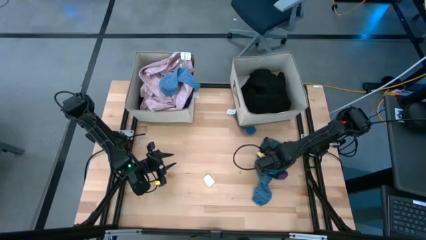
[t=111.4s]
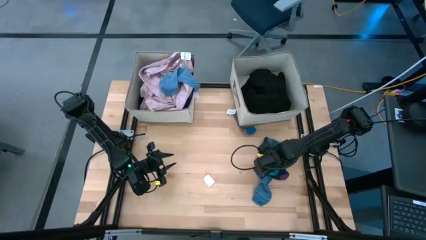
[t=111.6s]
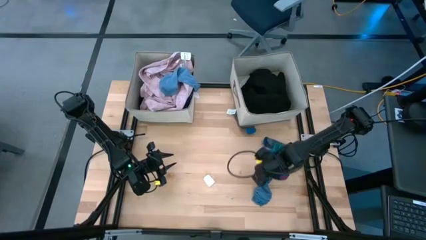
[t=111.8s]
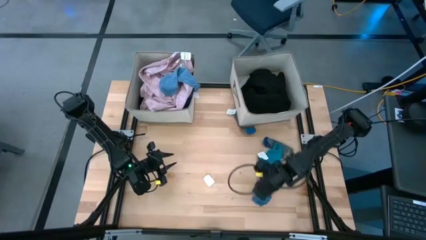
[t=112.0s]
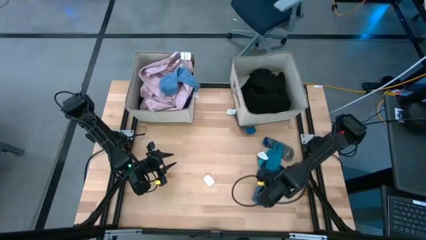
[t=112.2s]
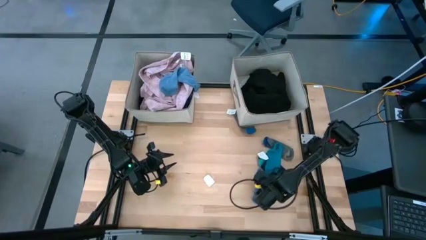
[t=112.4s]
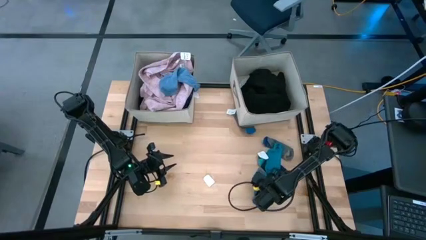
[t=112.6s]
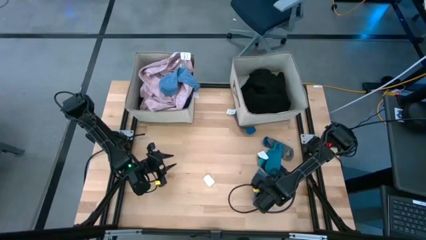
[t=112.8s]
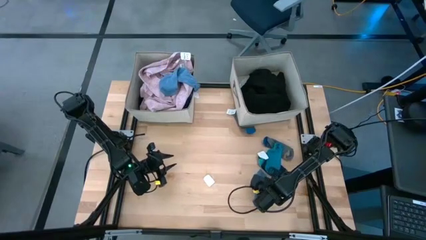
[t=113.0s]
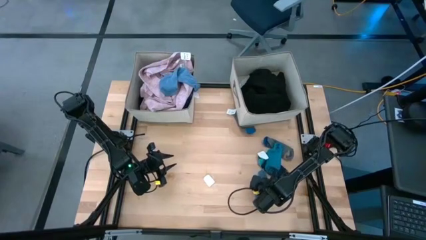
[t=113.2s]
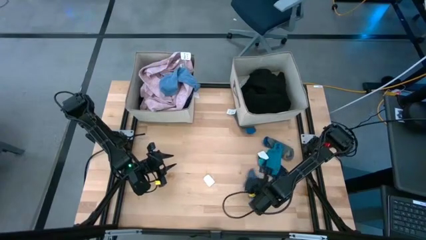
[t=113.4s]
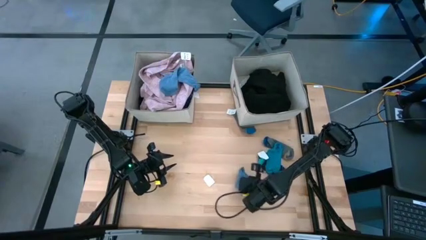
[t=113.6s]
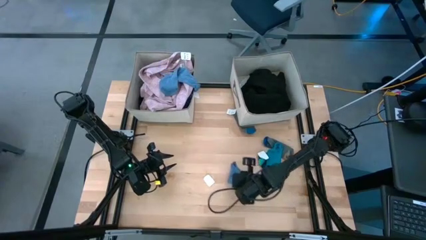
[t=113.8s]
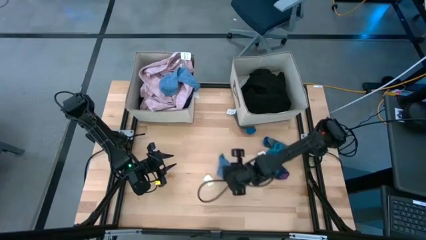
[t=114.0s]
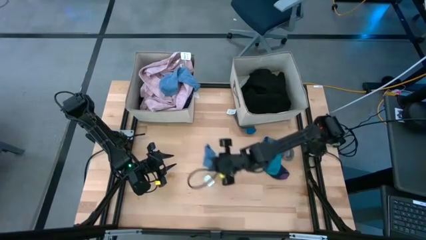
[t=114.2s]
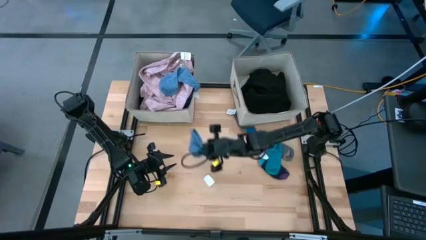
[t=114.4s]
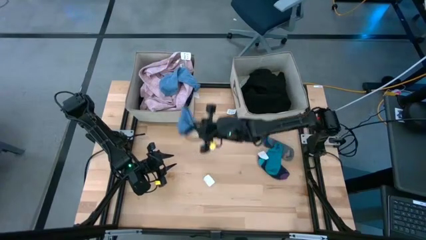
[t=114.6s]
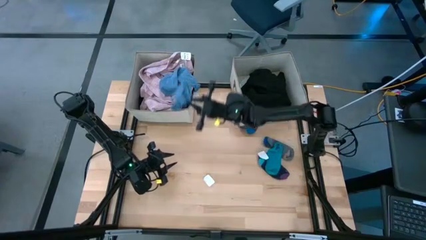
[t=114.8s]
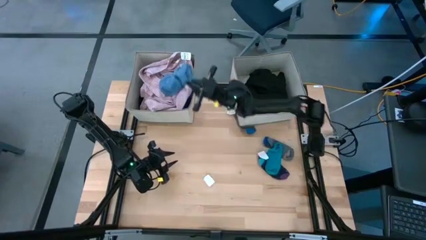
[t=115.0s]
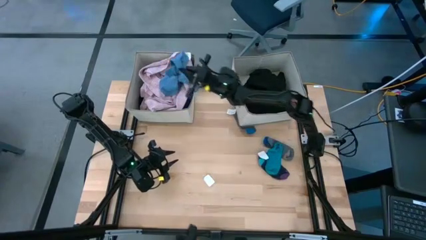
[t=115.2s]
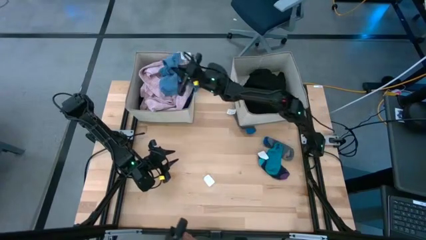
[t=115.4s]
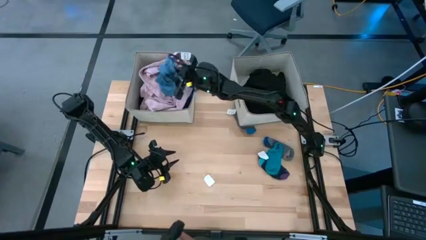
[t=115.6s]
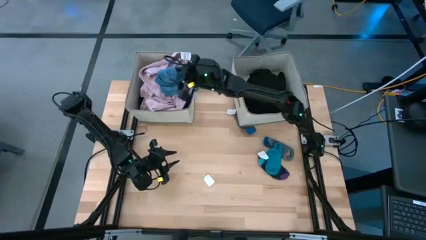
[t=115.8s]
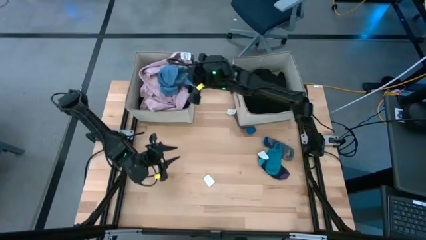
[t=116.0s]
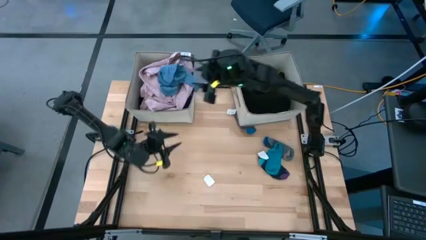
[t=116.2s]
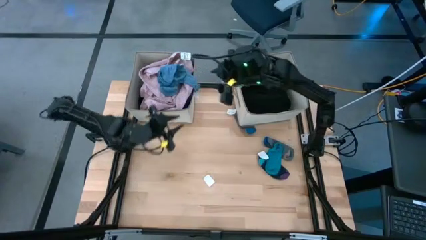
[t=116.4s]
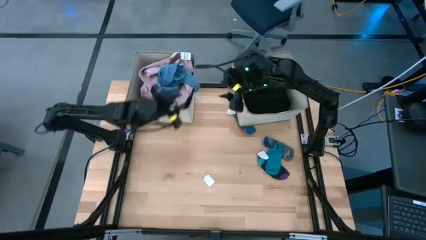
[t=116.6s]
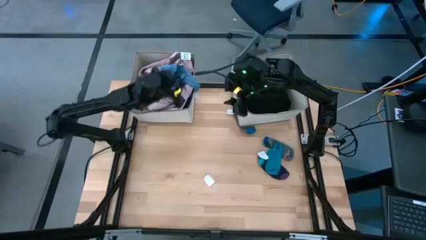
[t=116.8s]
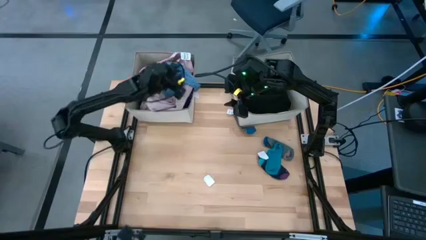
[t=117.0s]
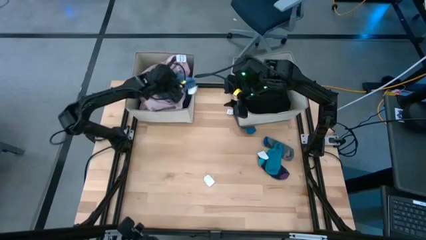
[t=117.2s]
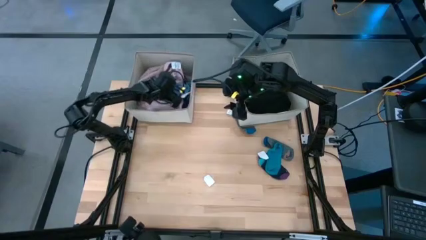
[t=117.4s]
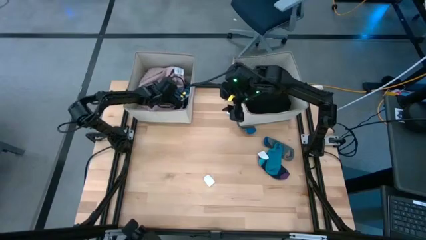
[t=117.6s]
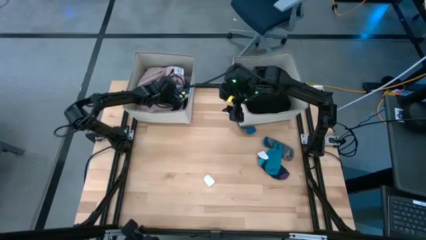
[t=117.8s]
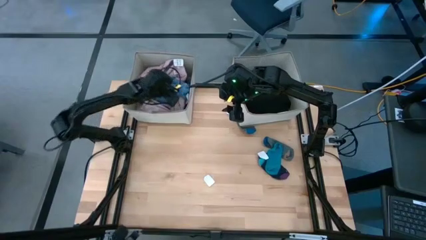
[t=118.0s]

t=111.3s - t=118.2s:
Task: Sort clothes
Put the blue sock into the left brown laundry organizer

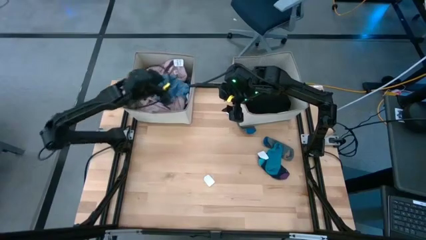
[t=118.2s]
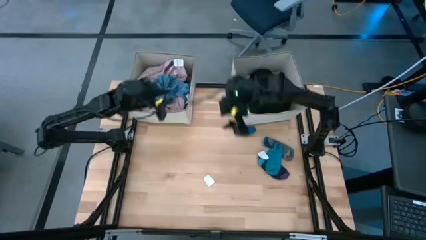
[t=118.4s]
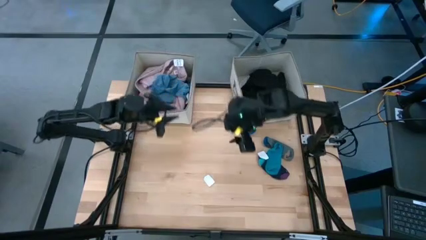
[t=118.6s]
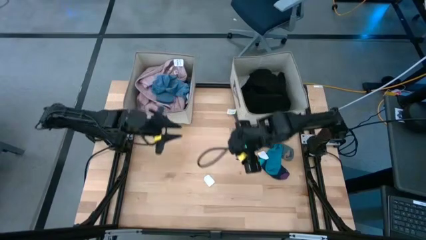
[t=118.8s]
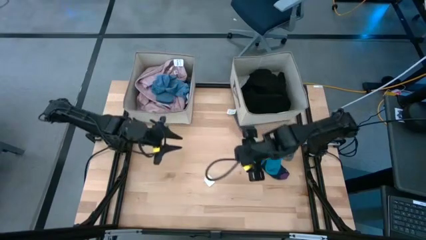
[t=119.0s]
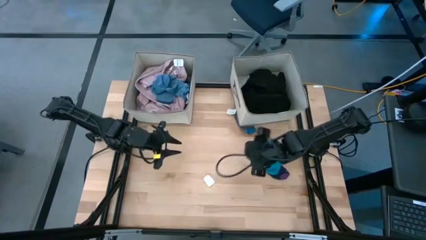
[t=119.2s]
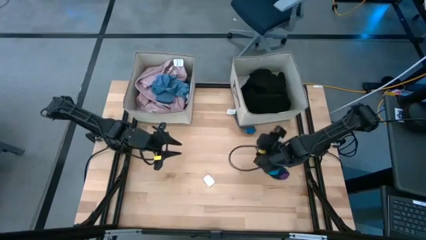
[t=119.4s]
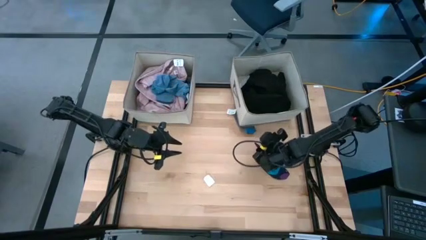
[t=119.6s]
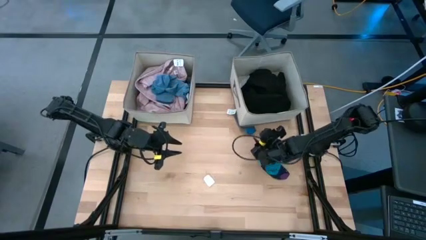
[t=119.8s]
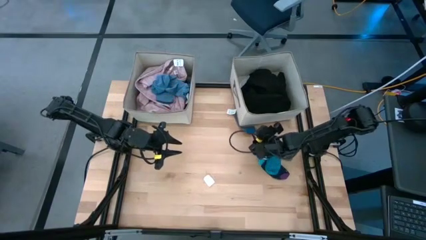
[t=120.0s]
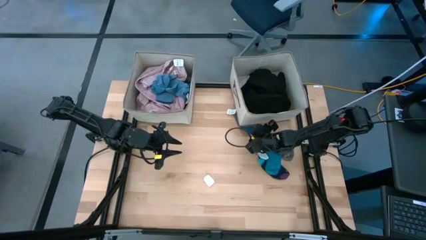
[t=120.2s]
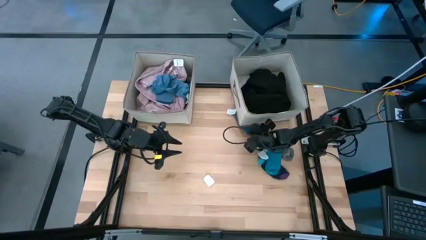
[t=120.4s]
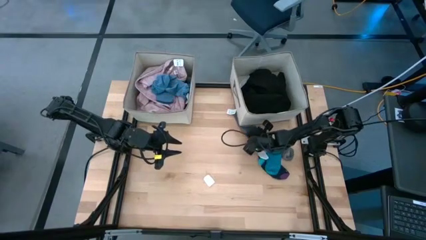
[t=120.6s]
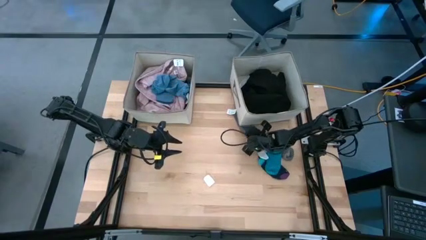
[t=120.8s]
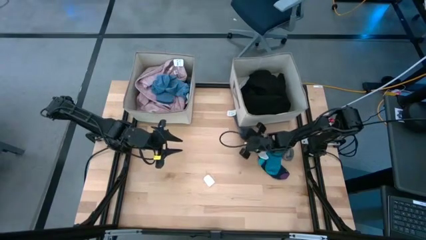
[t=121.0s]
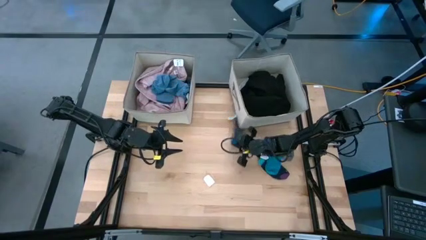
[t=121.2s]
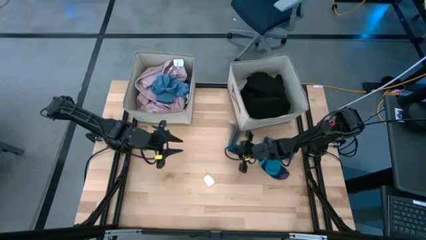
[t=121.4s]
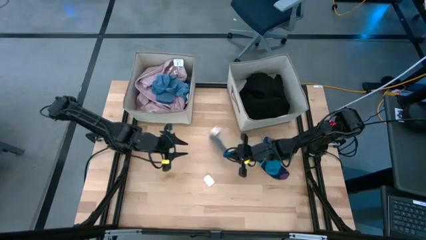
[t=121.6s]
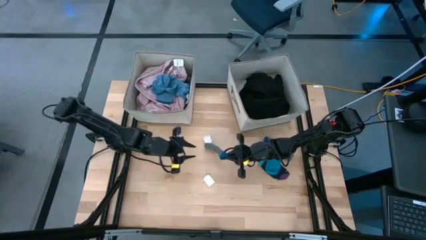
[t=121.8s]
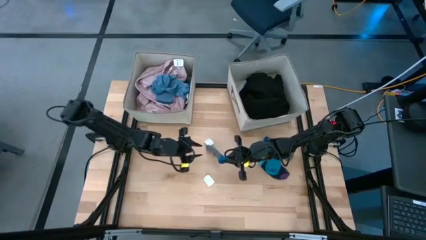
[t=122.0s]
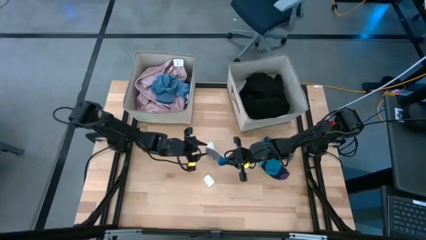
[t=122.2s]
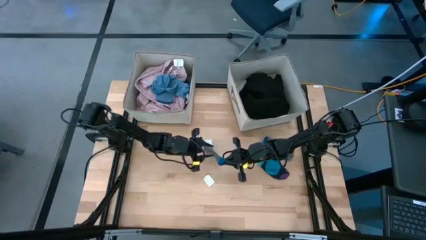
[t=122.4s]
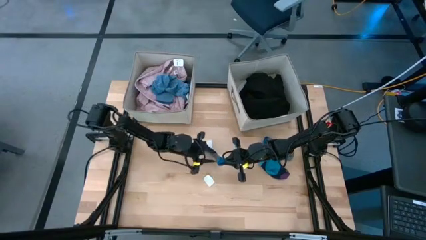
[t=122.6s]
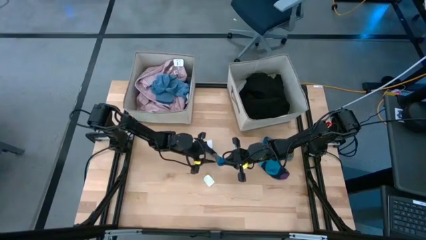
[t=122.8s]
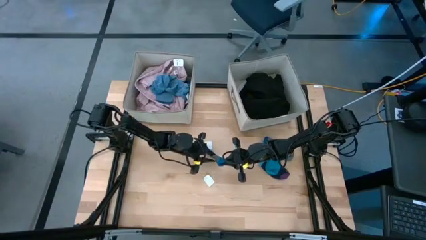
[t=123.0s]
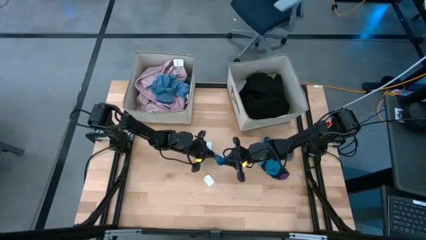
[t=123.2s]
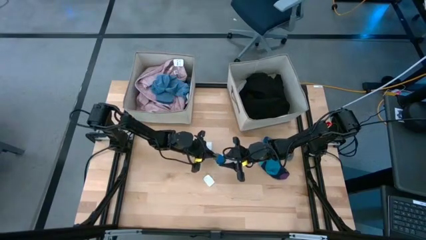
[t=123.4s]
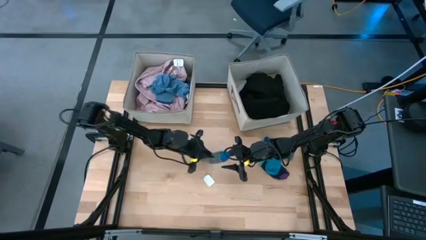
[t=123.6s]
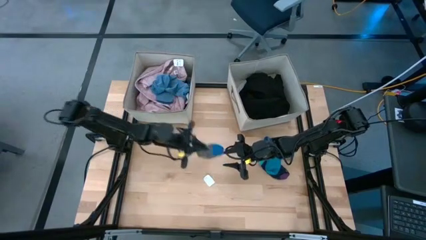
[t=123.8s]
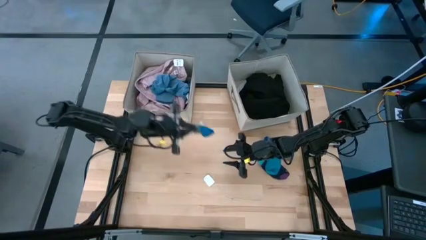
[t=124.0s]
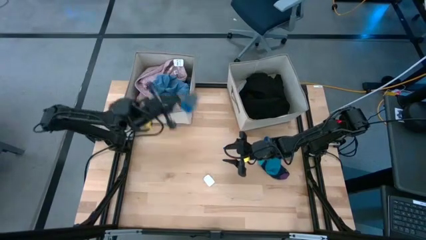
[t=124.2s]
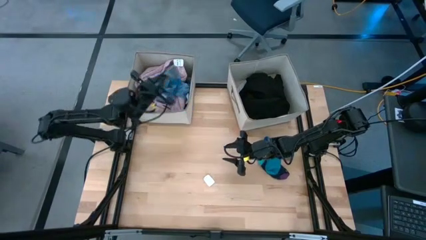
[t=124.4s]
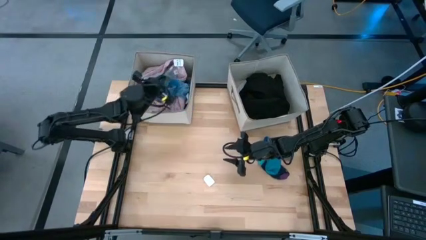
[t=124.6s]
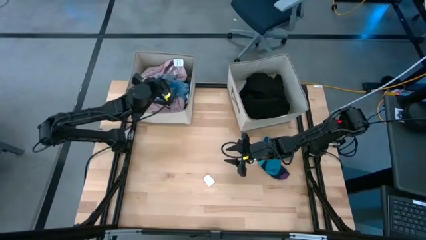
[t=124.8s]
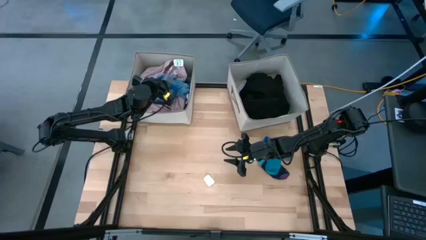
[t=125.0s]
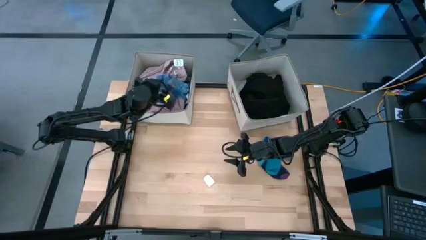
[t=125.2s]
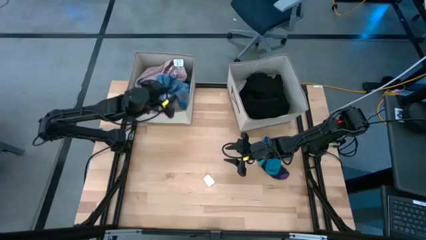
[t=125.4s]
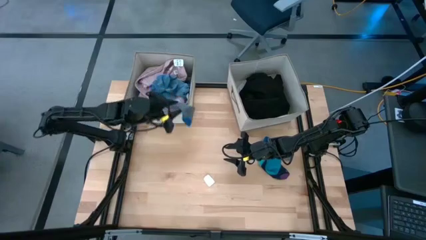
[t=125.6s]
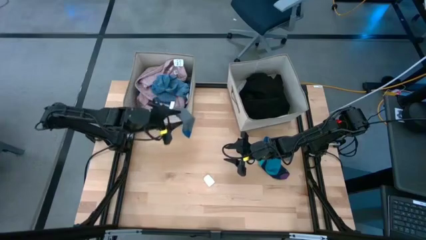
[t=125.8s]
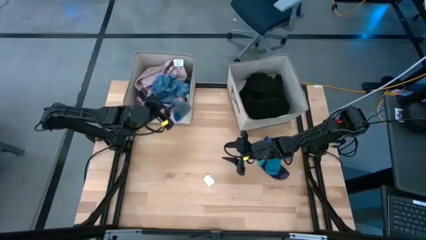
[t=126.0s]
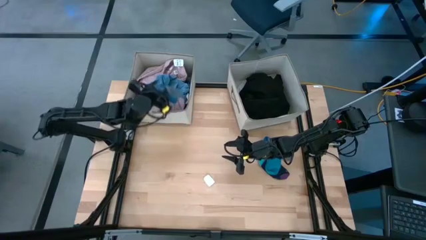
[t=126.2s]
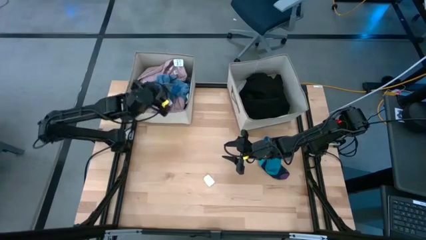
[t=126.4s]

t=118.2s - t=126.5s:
Put the gray sock into the left brown laundry organizer
